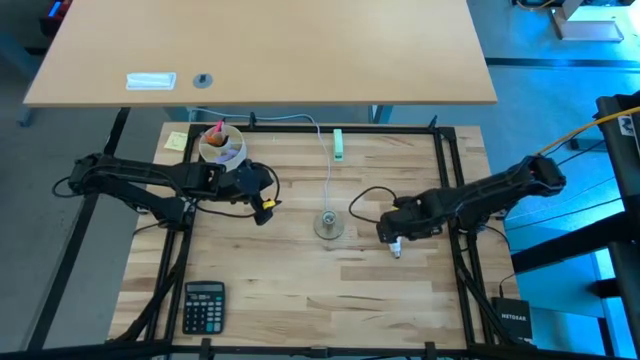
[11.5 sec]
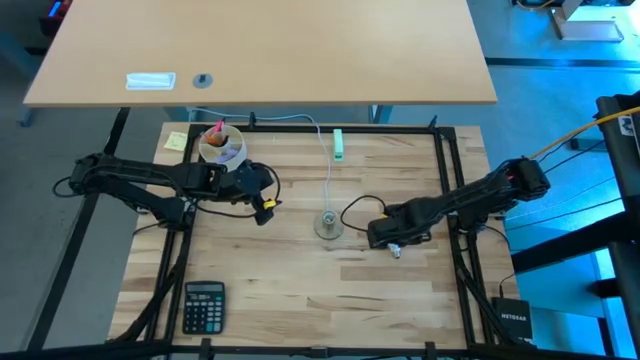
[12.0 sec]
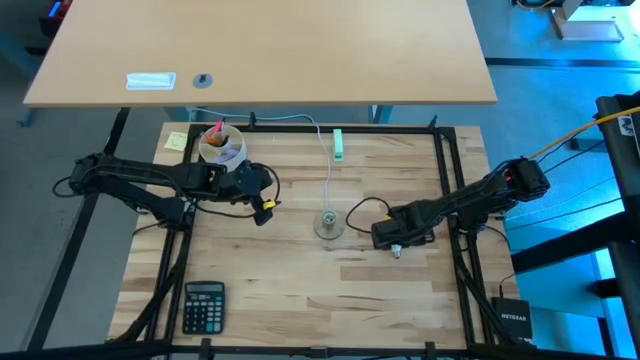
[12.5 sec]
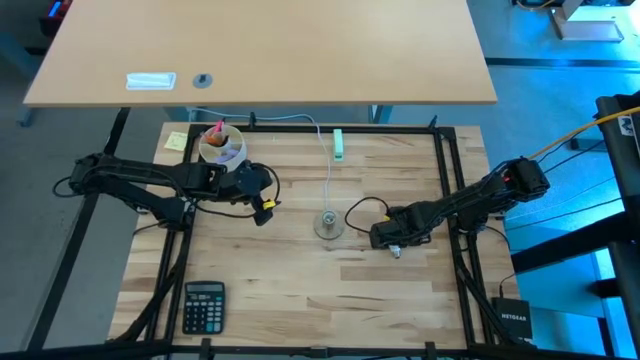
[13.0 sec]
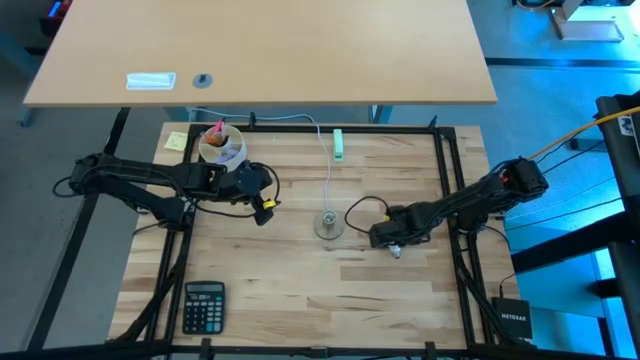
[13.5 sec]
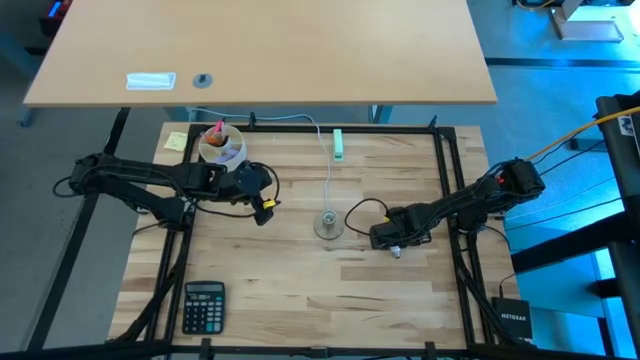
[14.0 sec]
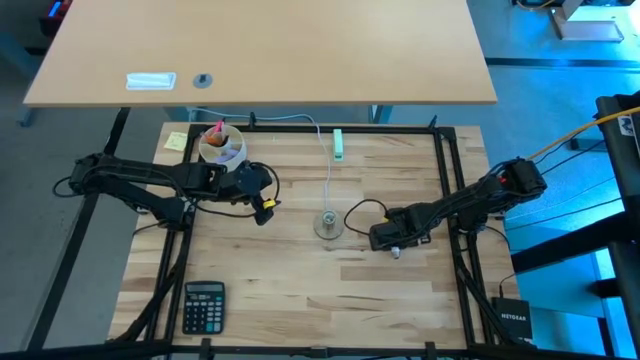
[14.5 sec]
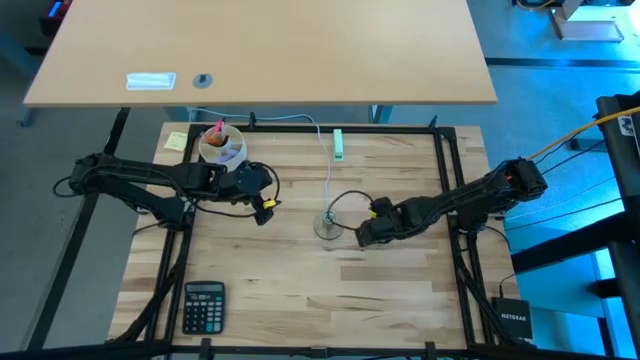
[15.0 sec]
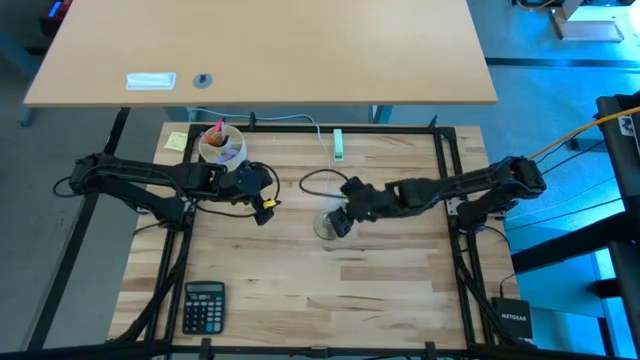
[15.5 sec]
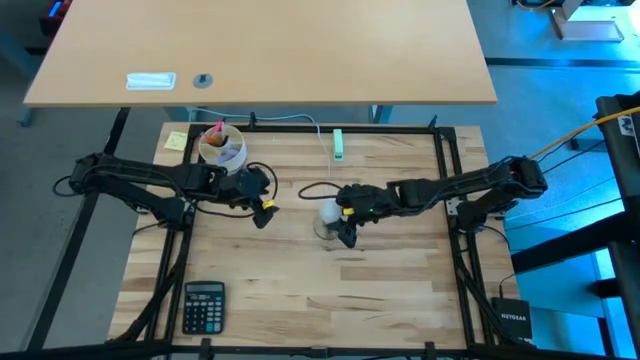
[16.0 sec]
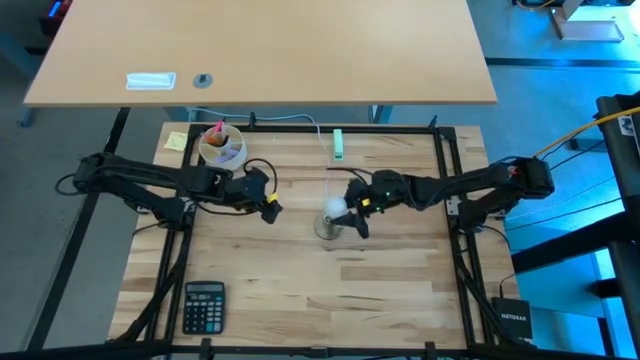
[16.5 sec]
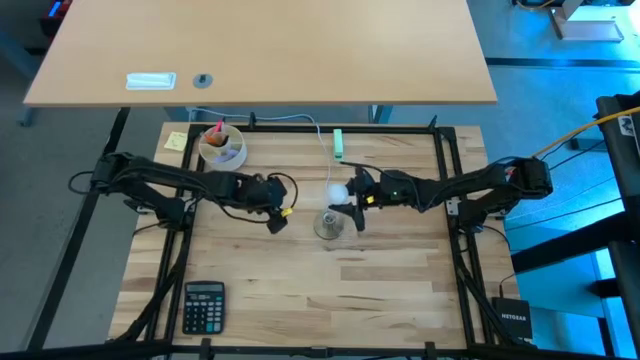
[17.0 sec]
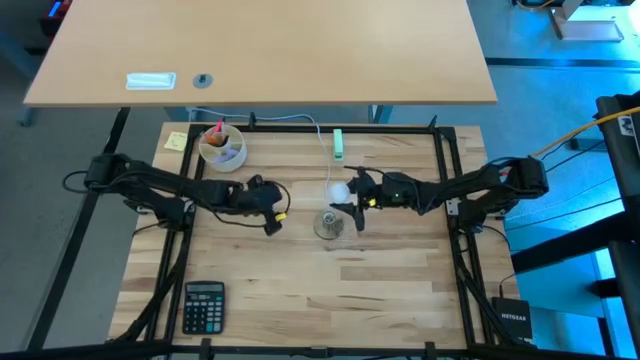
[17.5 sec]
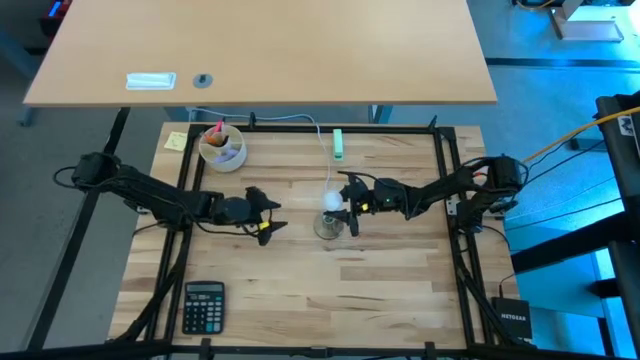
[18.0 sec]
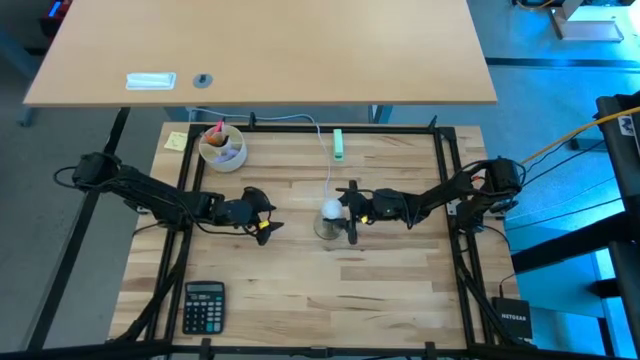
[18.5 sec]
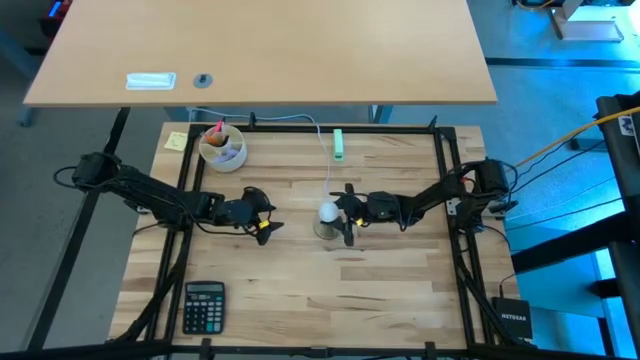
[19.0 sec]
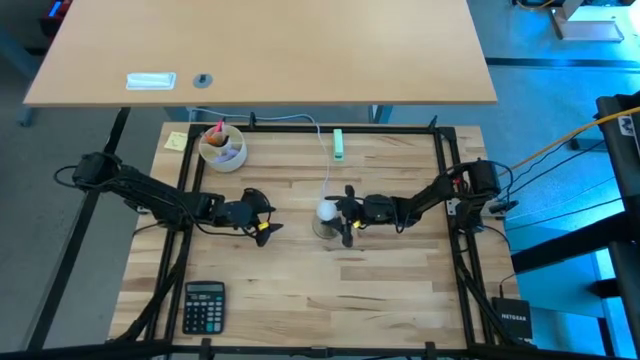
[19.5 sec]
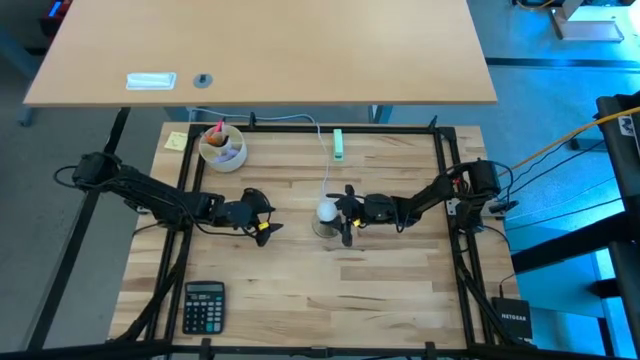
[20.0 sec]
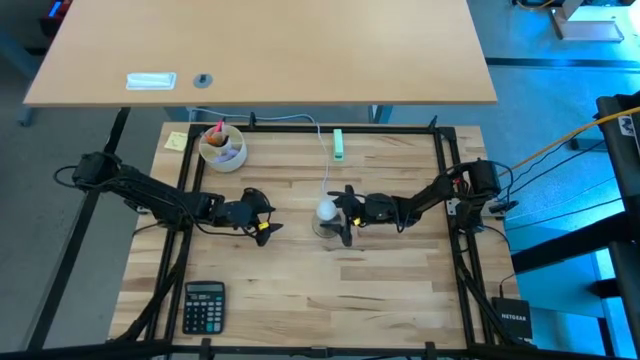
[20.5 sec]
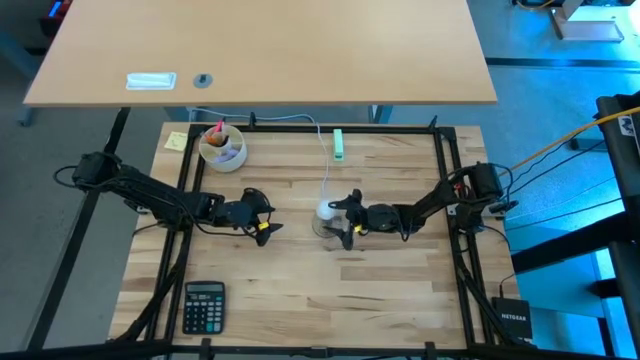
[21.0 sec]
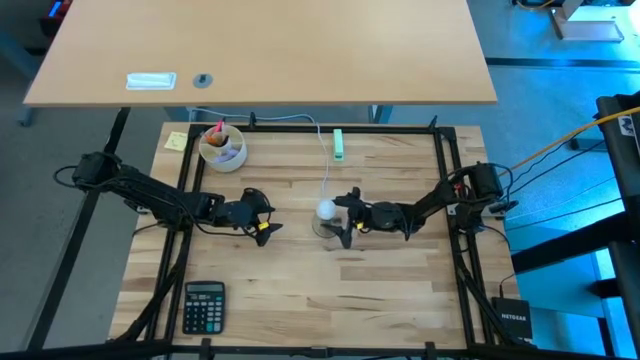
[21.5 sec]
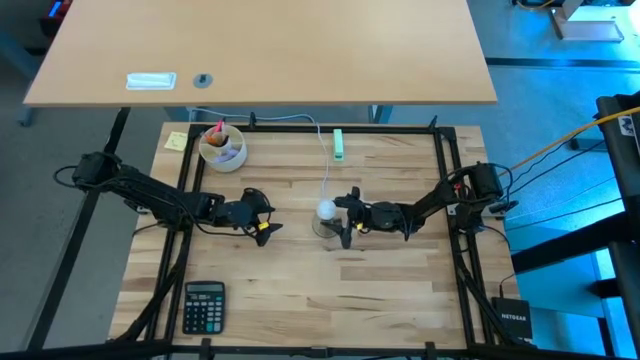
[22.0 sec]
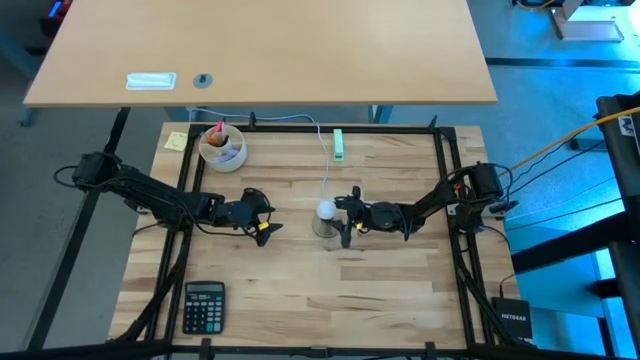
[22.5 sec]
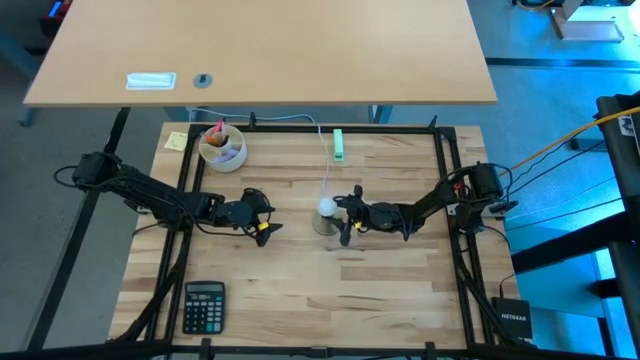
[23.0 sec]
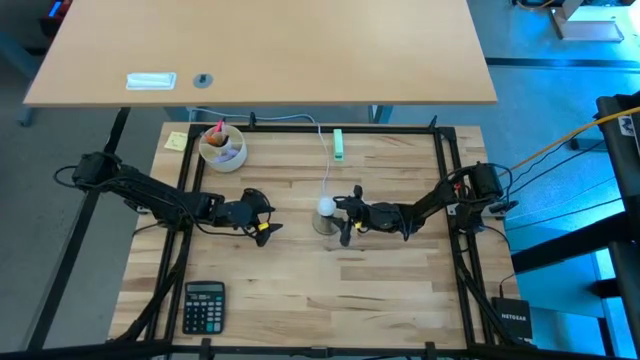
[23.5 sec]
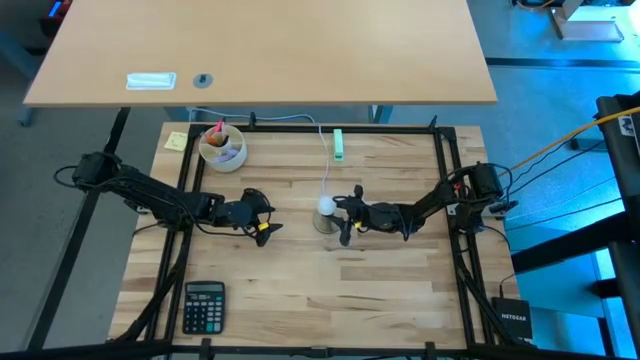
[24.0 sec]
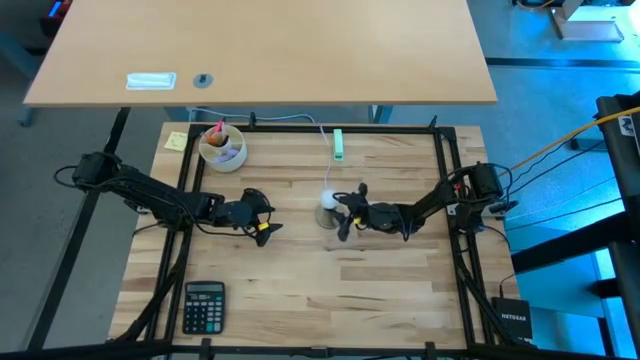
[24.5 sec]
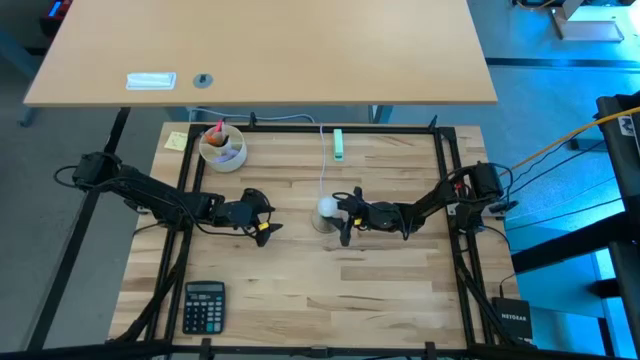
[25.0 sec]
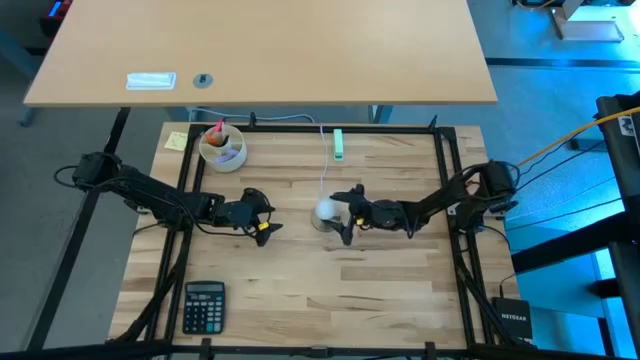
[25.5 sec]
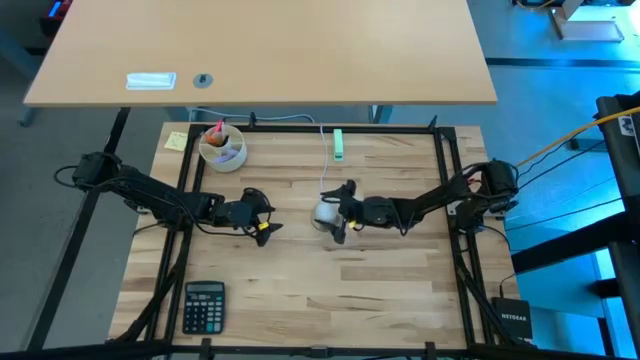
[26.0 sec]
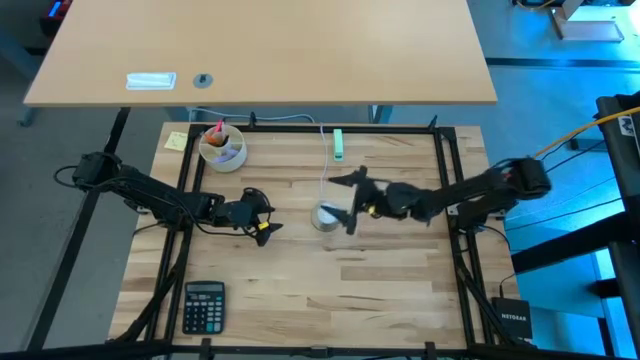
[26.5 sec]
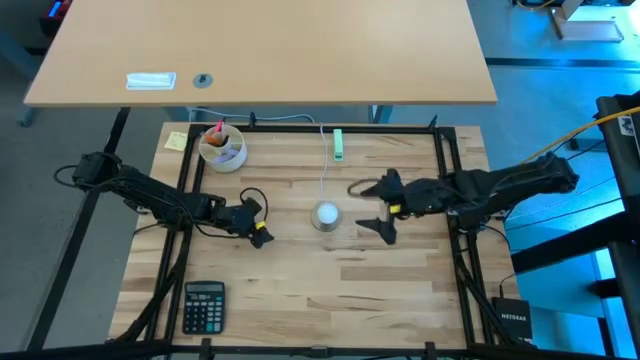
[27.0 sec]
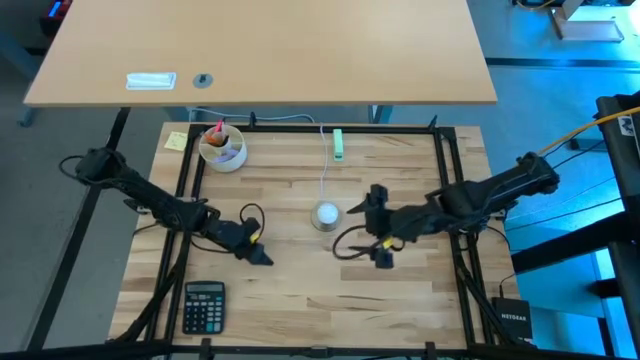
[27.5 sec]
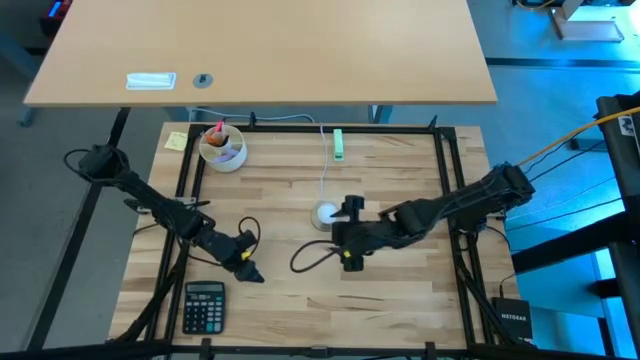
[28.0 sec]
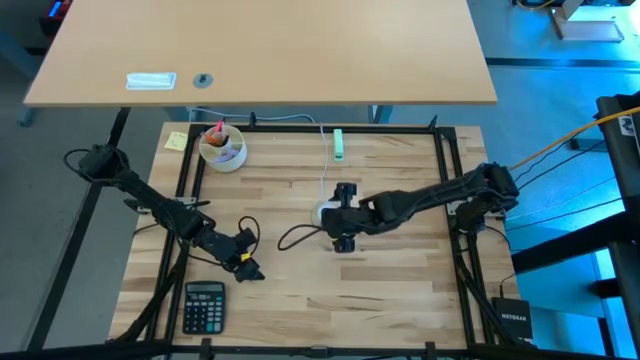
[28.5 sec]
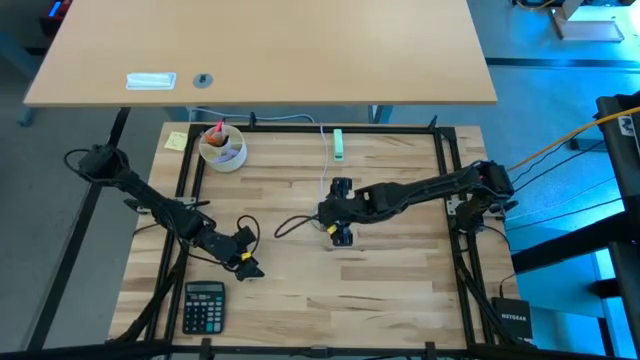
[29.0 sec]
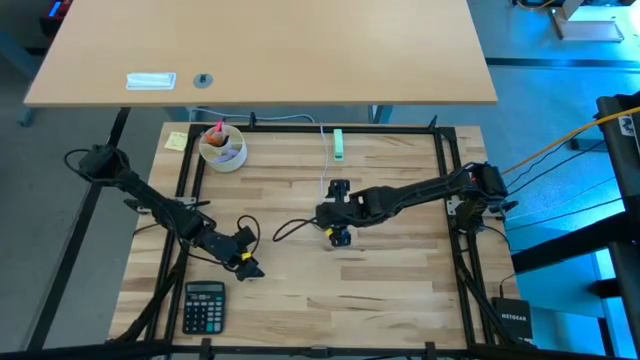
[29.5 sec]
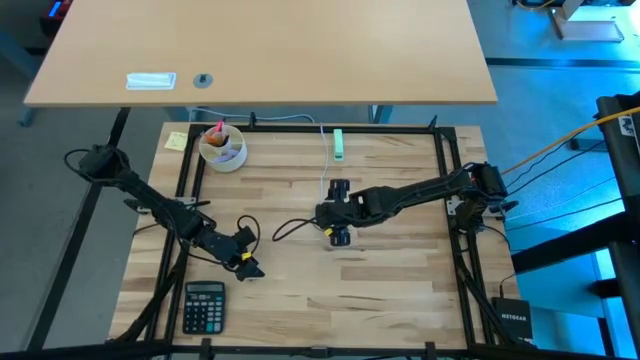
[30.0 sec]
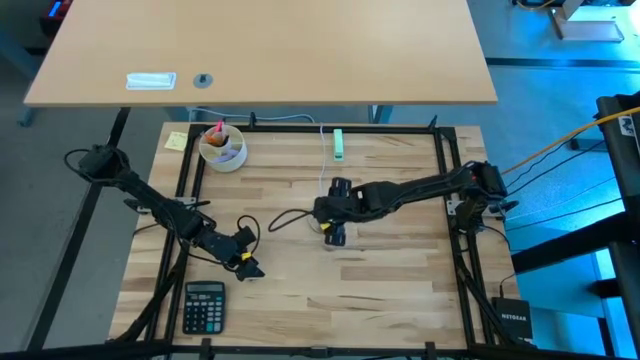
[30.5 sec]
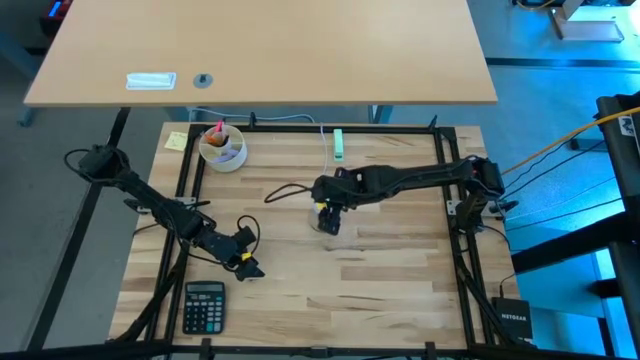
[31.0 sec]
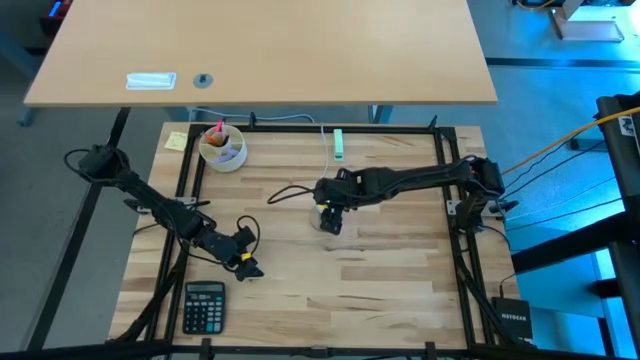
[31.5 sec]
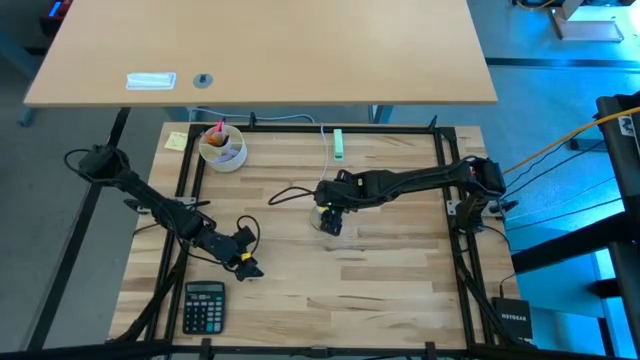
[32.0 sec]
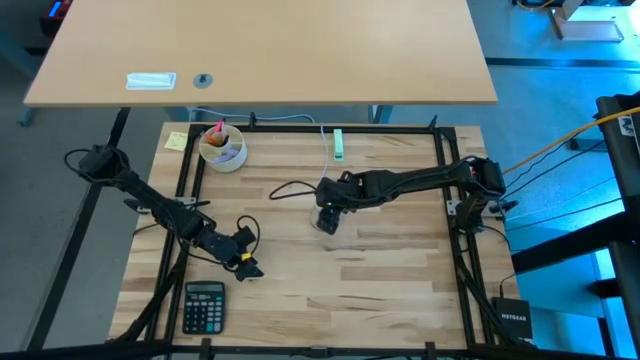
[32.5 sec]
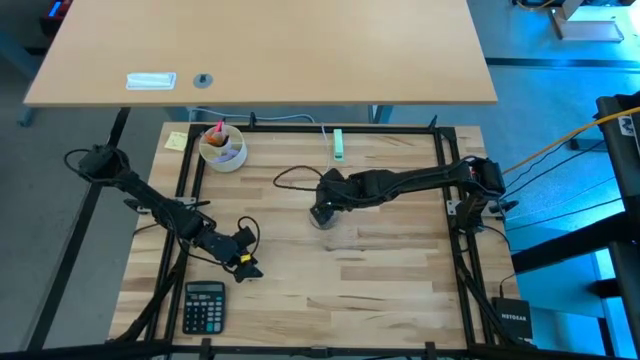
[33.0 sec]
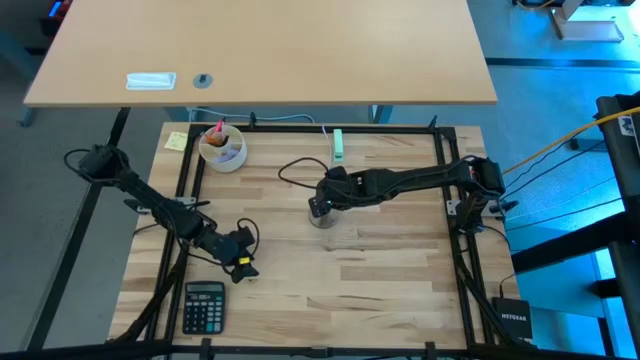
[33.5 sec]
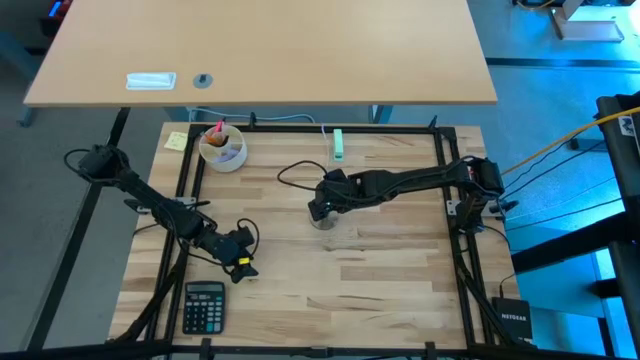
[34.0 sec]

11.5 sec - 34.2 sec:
Task: Screw lightbulb
Insert the lightbulb into the lamp
